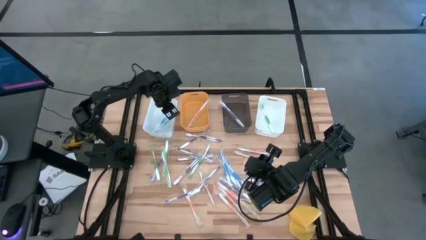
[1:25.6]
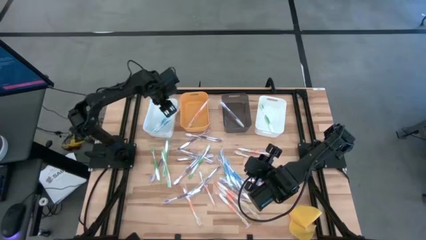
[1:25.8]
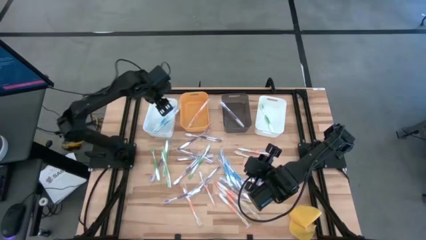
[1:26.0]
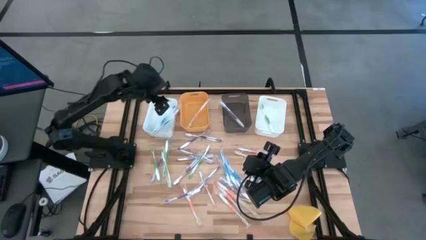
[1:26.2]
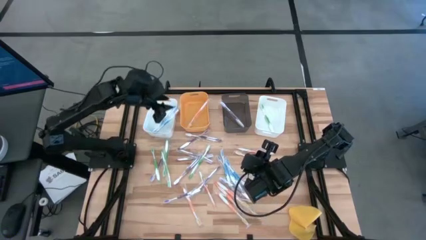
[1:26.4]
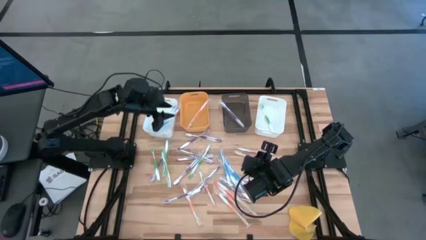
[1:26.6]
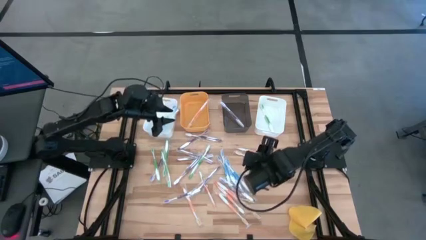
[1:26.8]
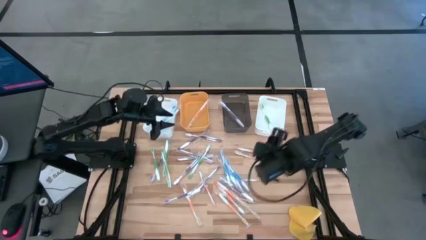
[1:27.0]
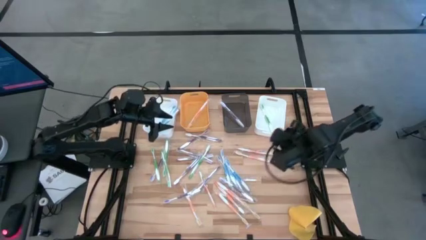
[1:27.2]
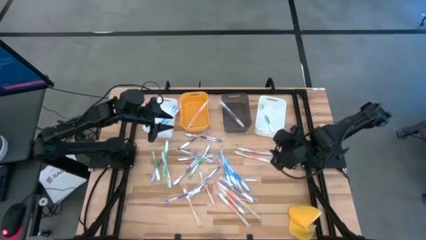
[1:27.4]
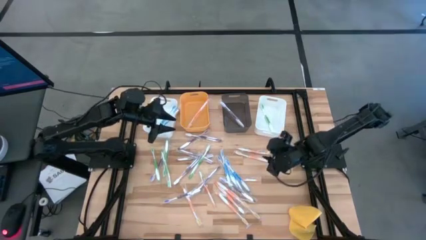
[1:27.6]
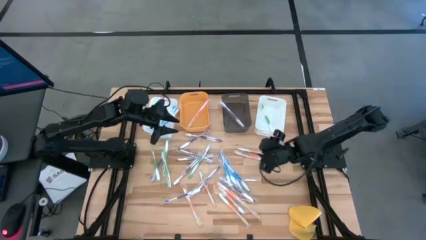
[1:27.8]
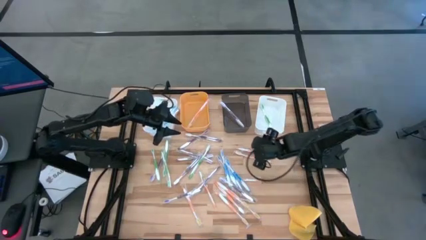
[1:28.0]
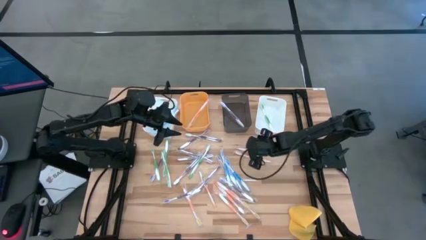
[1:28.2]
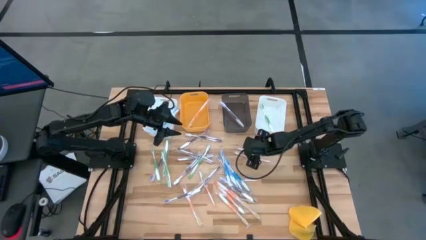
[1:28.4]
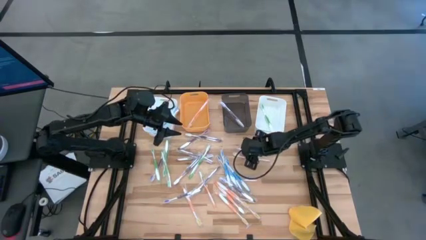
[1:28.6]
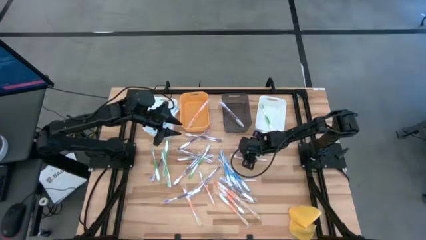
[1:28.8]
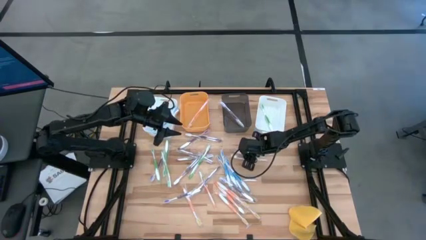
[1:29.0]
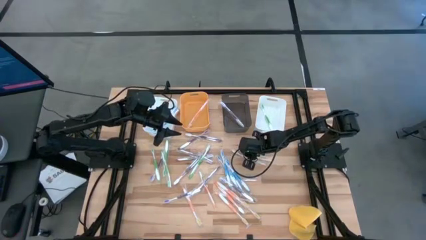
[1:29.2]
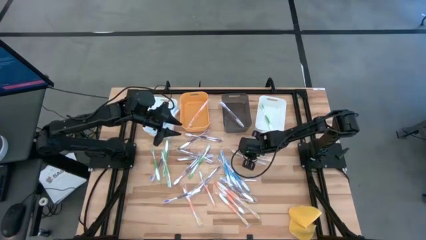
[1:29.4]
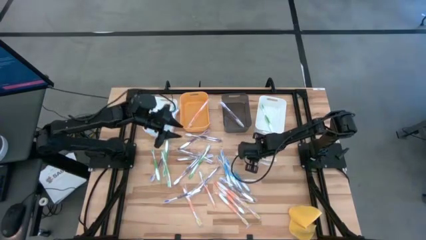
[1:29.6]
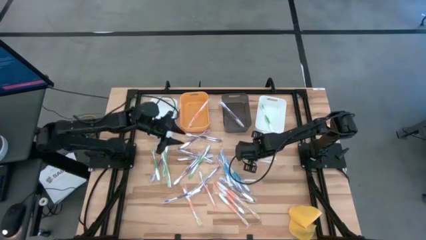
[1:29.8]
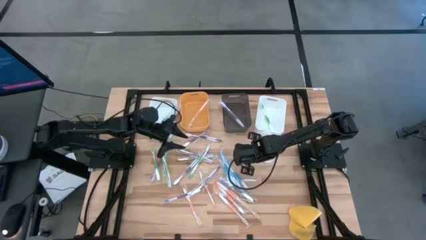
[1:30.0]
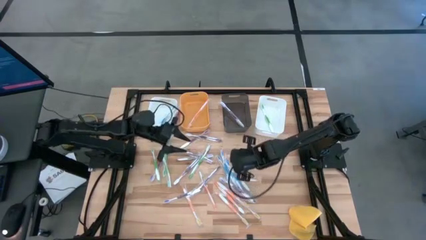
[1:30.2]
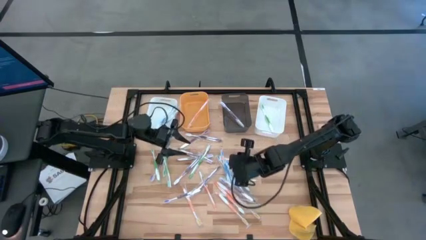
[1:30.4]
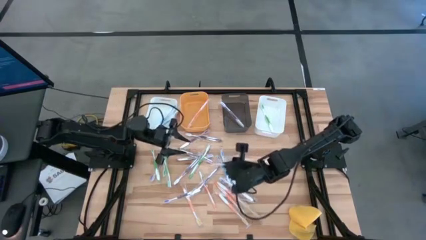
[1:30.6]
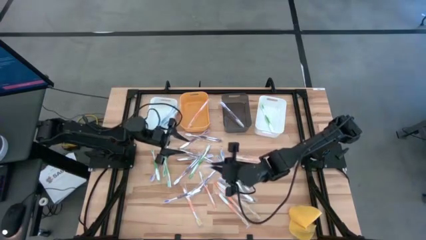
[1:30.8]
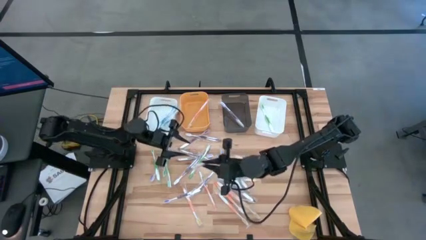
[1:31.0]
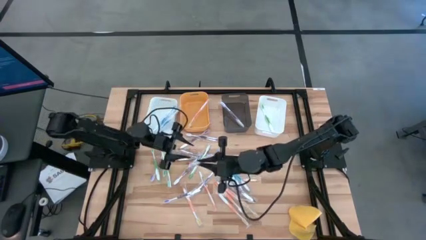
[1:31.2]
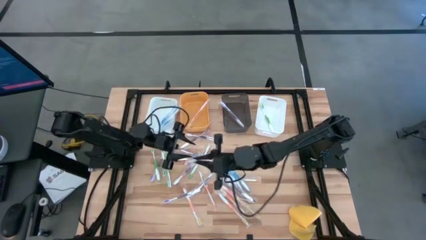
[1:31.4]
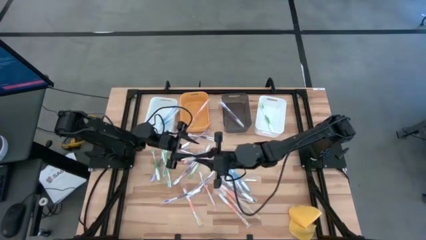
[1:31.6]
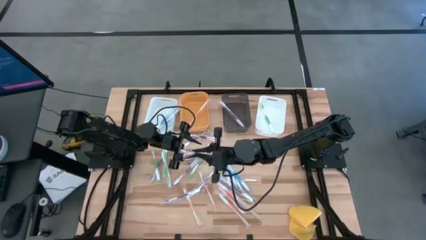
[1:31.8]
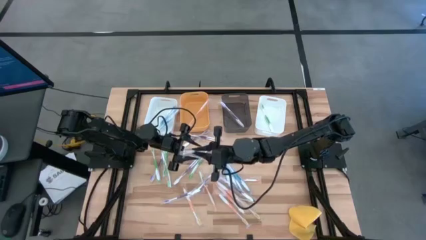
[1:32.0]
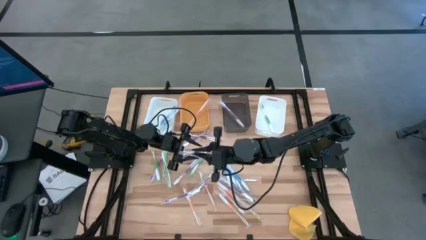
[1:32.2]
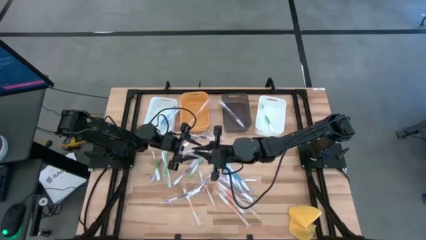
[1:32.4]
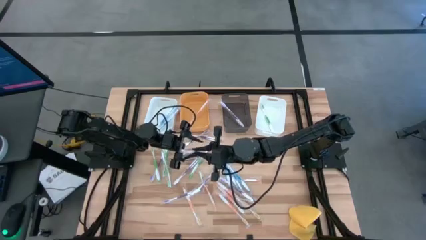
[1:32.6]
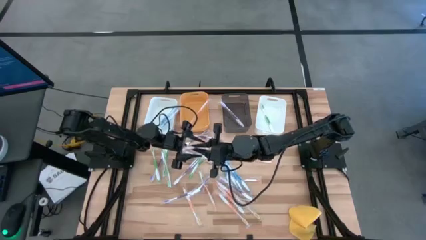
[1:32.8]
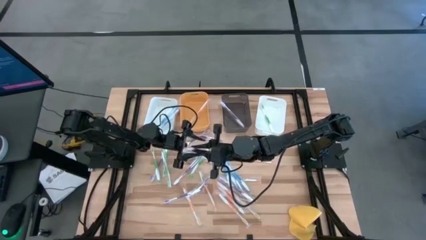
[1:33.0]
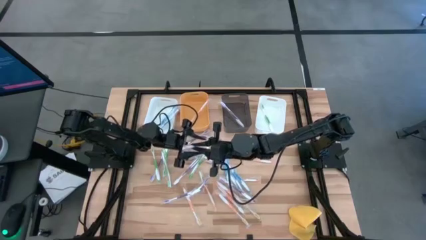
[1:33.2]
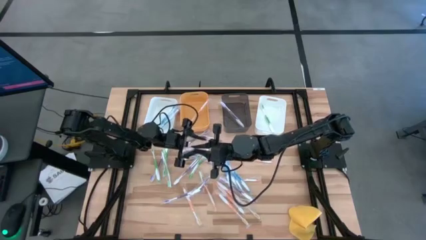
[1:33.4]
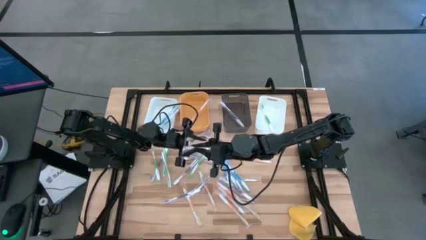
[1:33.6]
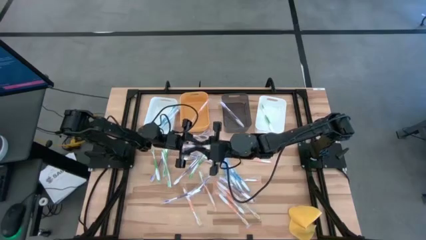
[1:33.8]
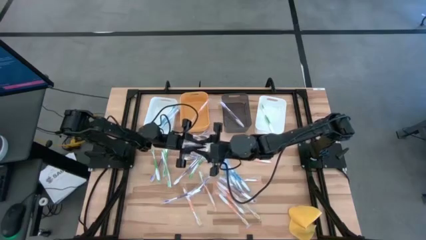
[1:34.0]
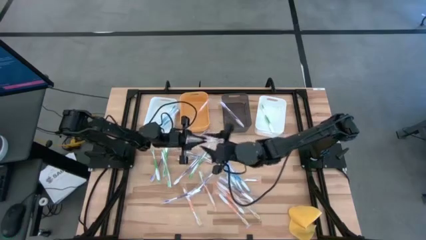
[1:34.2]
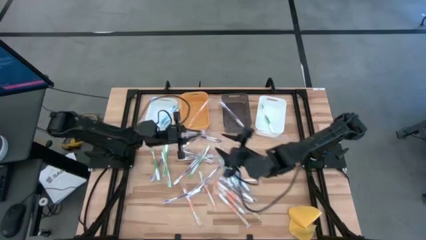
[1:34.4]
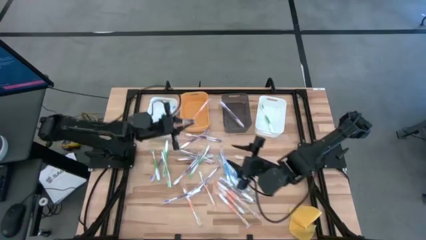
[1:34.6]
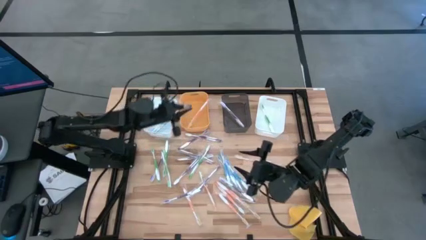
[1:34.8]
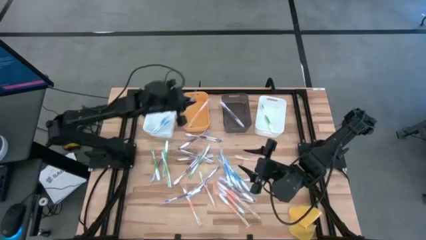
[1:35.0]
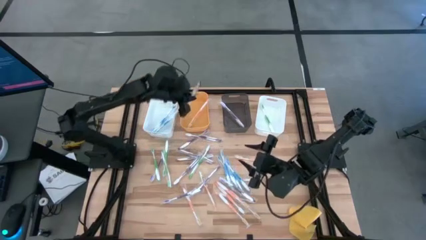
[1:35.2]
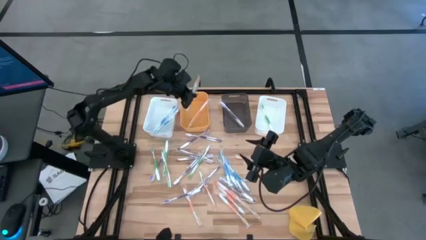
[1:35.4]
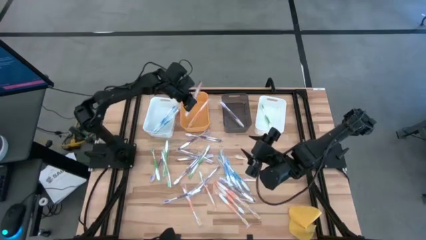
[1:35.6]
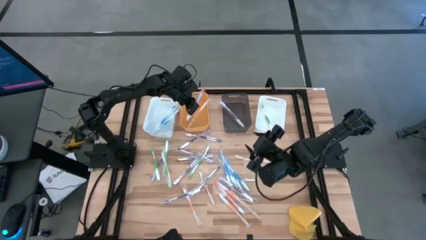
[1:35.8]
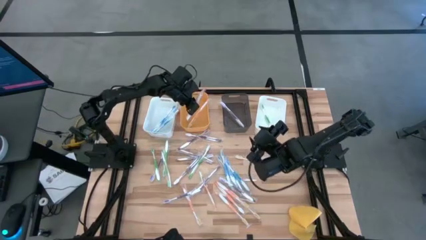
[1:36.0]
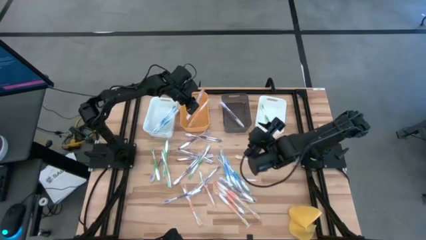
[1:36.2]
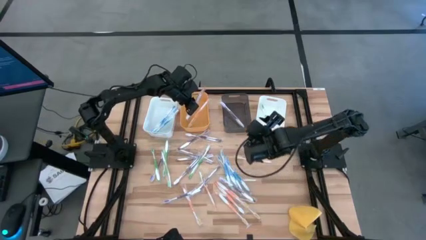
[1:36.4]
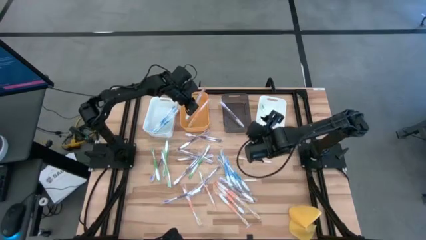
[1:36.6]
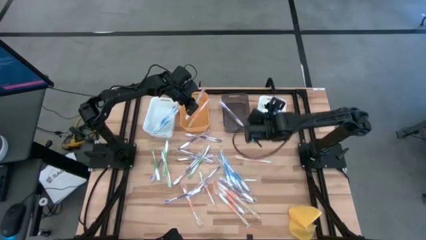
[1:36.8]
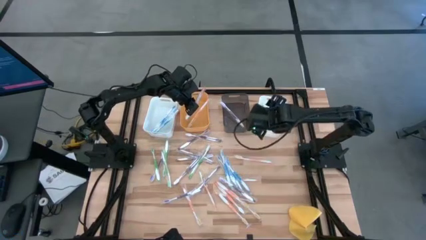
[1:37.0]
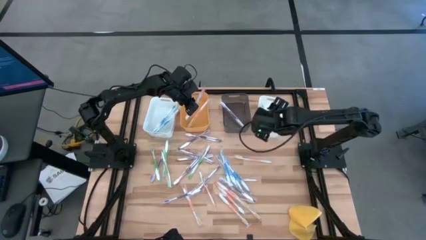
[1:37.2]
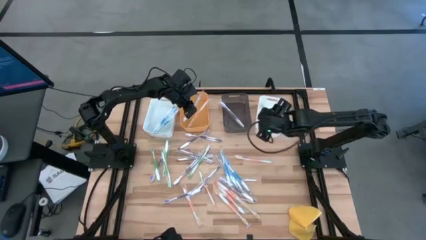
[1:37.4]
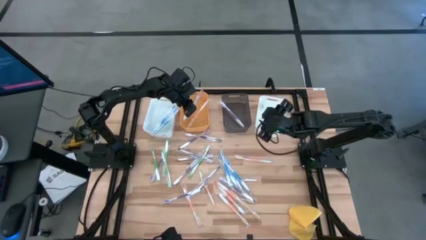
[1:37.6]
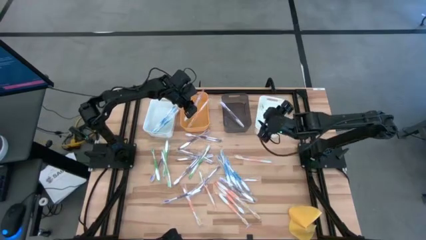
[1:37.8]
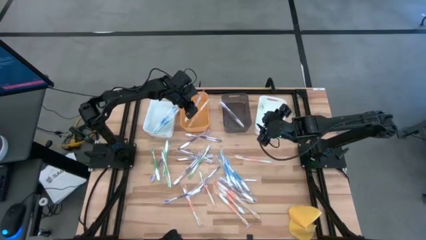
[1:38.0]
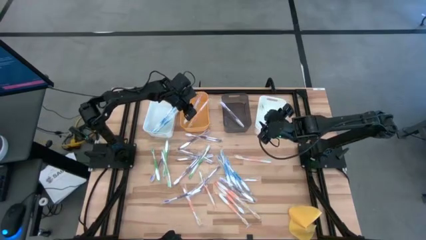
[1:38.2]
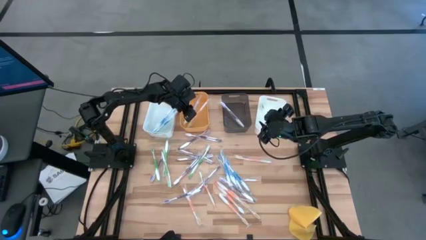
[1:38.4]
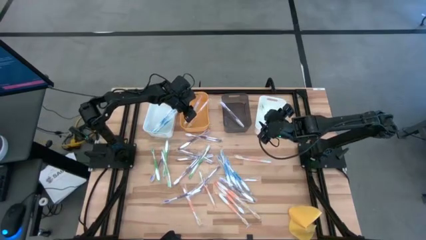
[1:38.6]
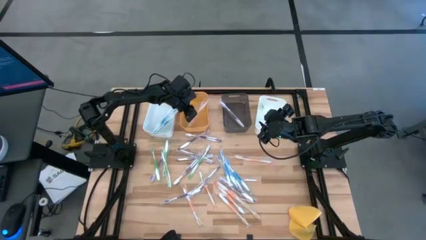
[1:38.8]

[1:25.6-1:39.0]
Task: Pick & Place Toothbrushes
Put the orange toothbrush into the yellow bin

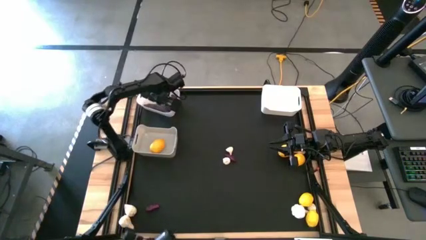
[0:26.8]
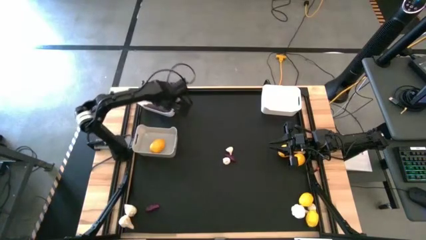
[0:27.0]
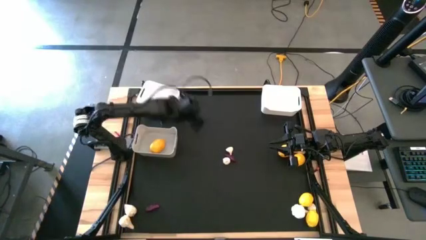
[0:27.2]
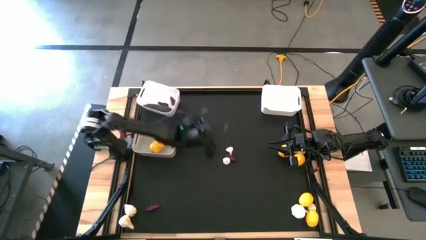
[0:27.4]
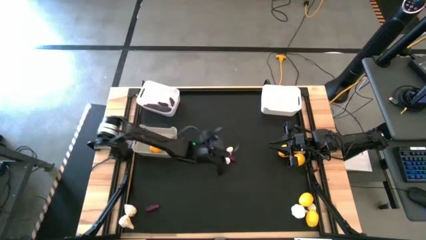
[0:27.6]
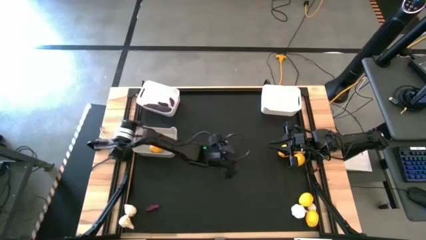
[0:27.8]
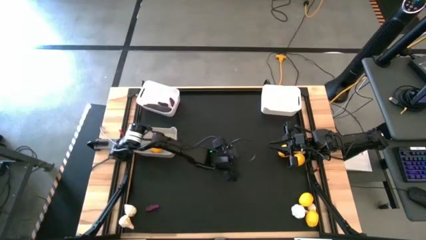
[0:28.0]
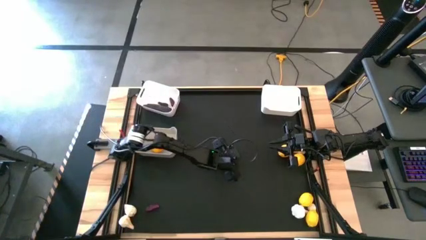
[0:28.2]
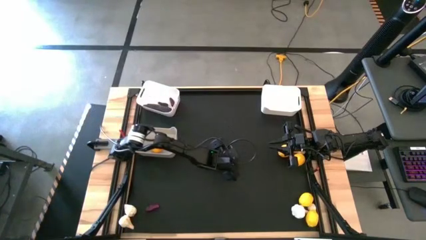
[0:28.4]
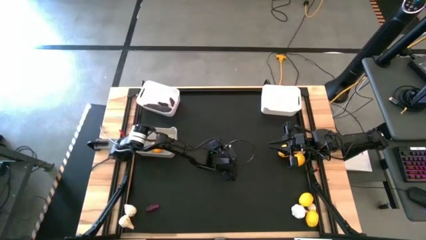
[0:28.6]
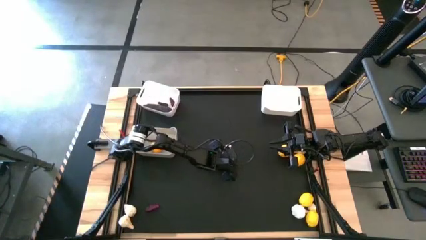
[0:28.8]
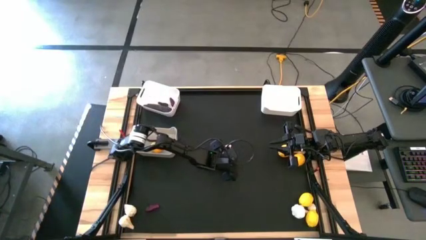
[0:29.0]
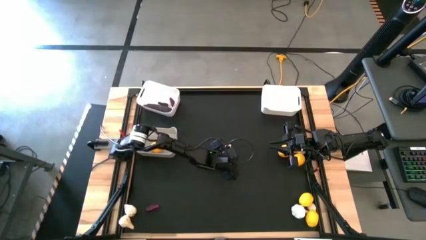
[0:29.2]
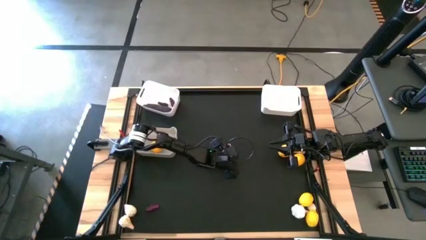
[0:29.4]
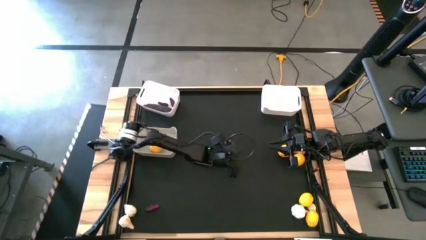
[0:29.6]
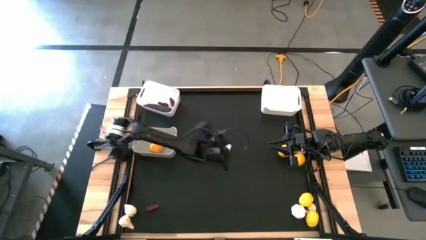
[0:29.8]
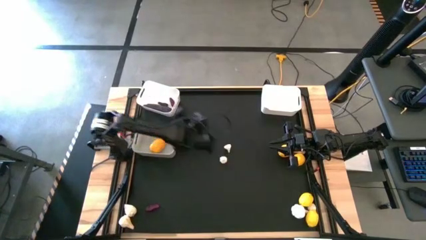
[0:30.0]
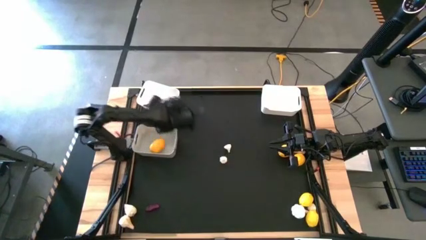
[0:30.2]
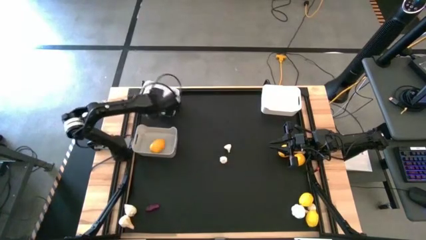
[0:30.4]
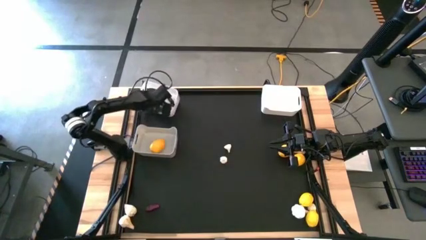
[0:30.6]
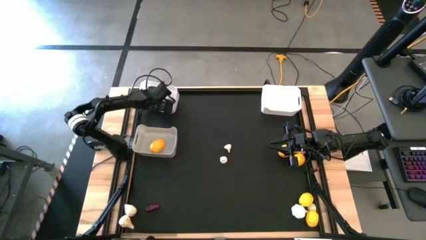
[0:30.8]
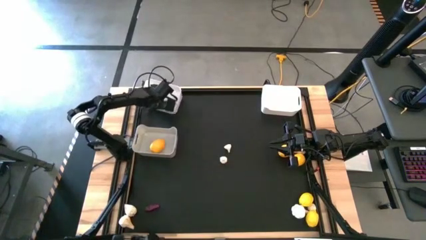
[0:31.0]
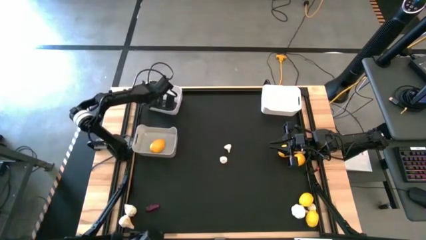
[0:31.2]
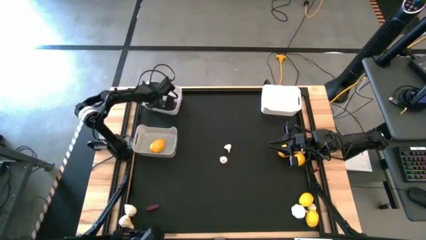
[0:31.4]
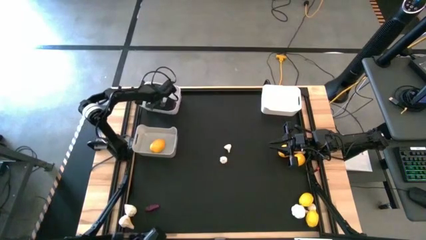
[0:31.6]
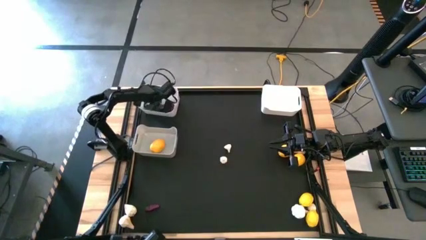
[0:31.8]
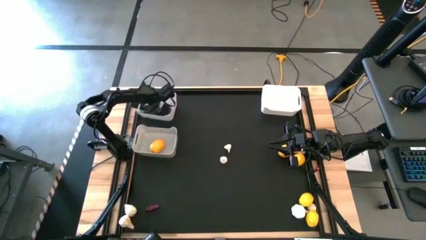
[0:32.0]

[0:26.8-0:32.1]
Task: Sort produce into baskets
Put the eggplant into the left white bin
